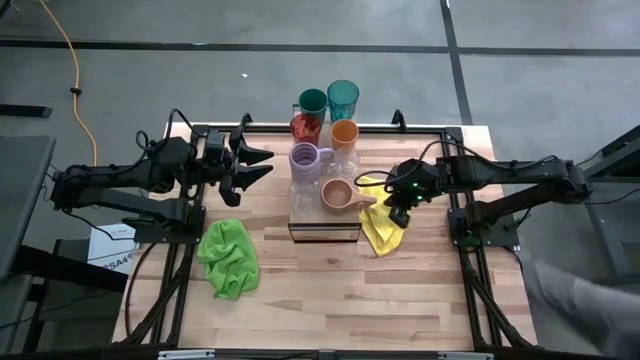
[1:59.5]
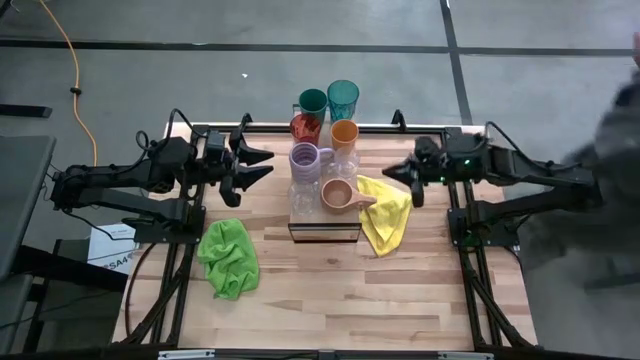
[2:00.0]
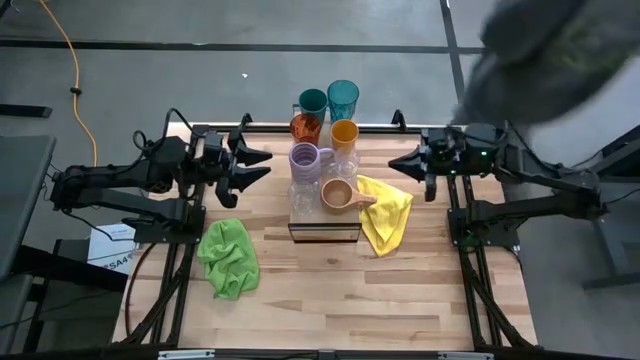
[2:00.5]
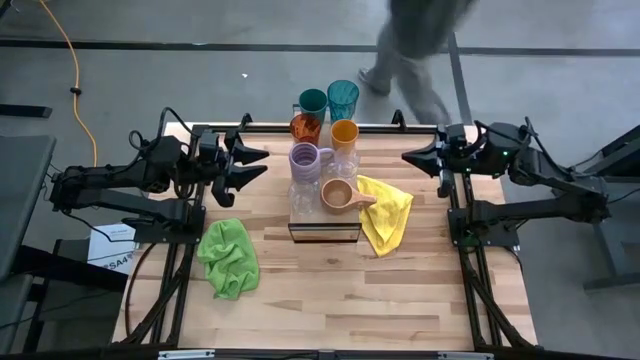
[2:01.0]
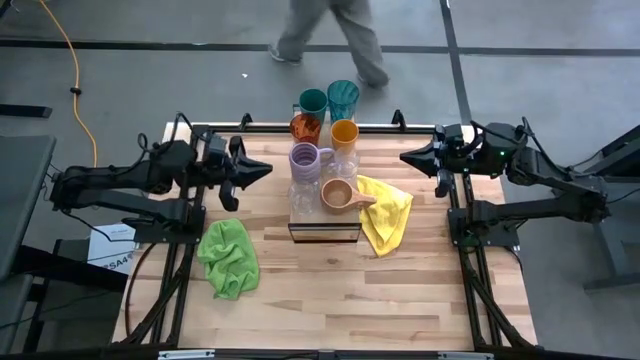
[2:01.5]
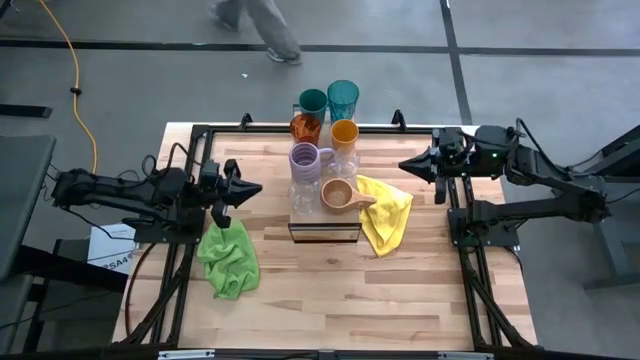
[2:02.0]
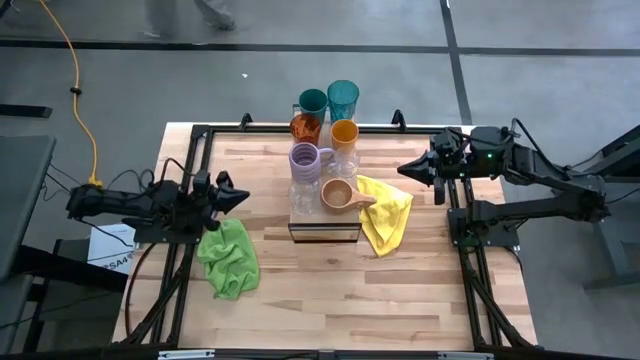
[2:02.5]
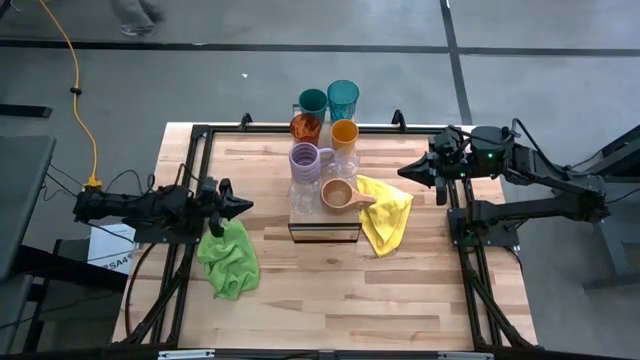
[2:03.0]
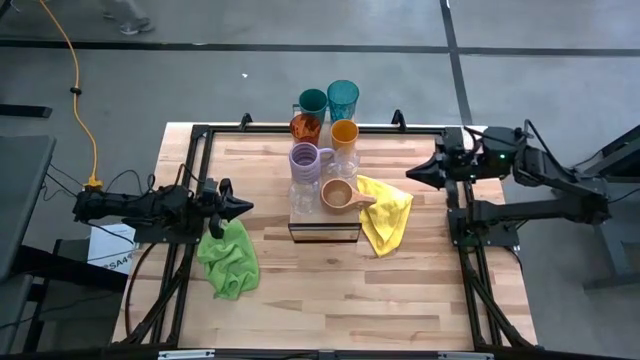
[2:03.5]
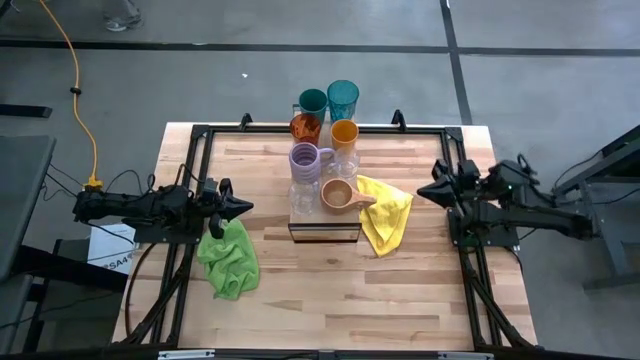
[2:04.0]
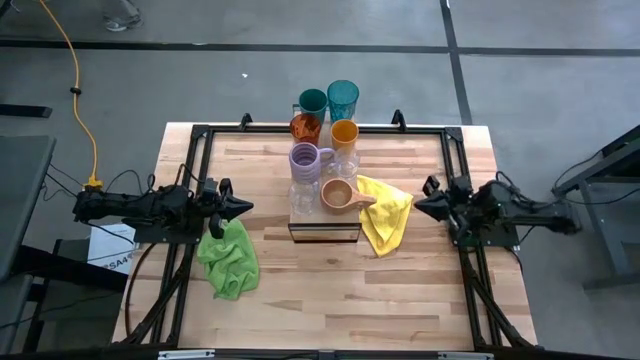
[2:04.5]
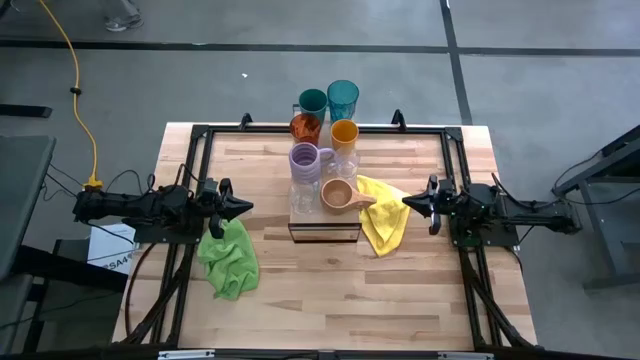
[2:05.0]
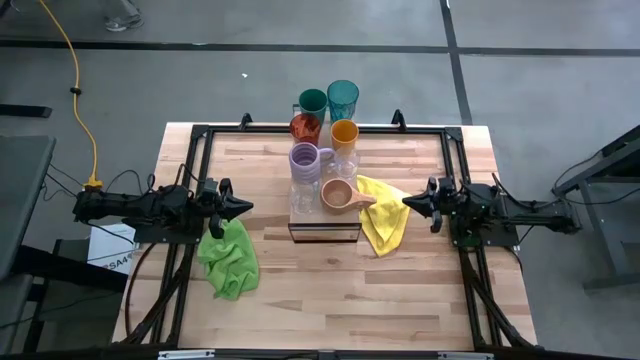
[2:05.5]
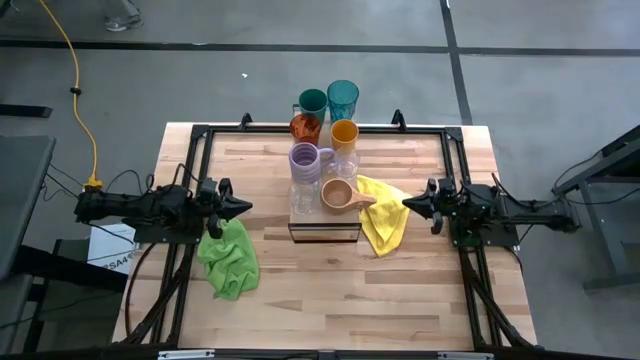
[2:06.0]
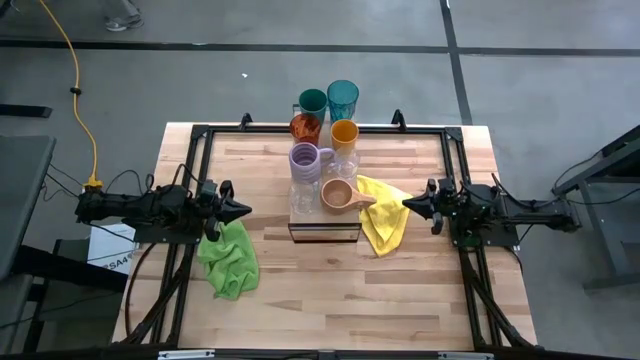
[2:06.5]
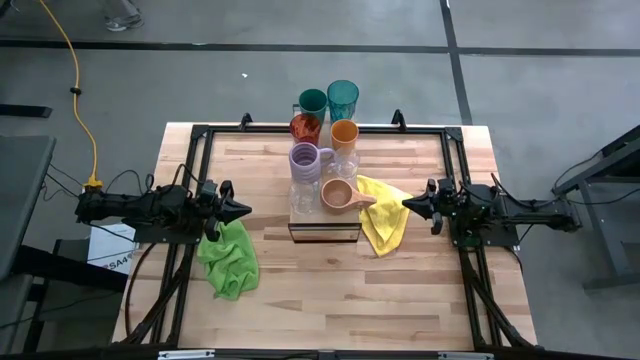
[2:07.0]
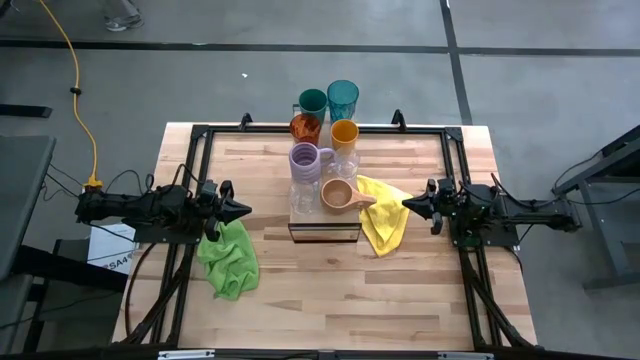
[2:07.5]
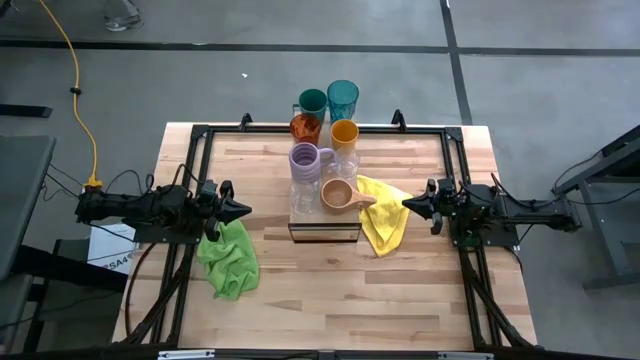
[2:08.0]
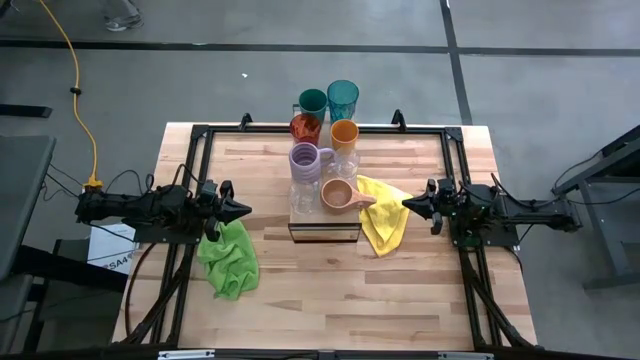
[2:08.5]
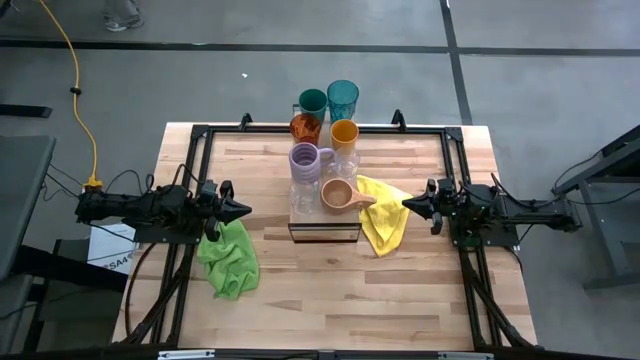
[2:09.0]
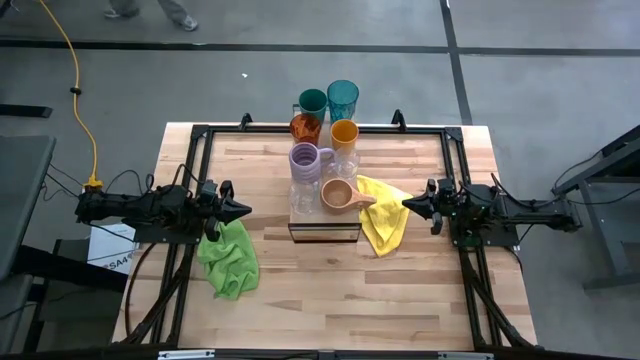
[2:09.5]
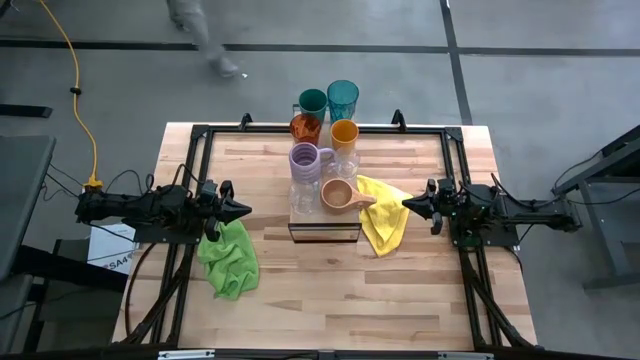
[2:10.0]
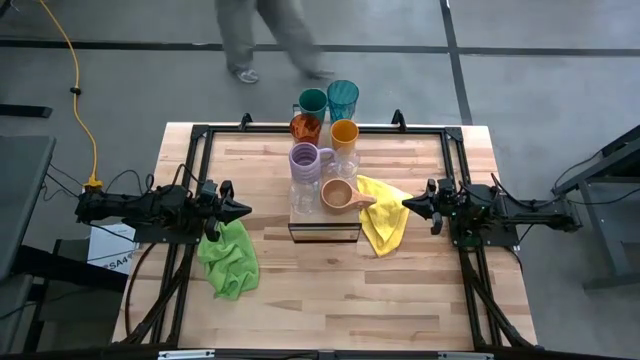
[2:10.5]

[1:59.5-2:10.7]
Task: Stack small to large cups/mugs on shelf
Return to Home Position

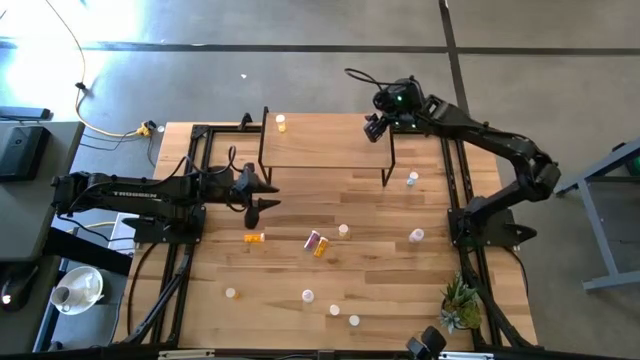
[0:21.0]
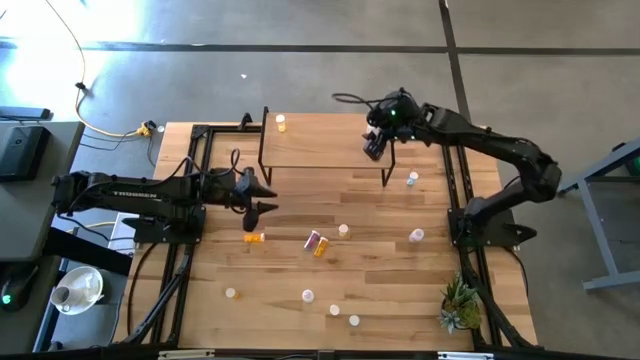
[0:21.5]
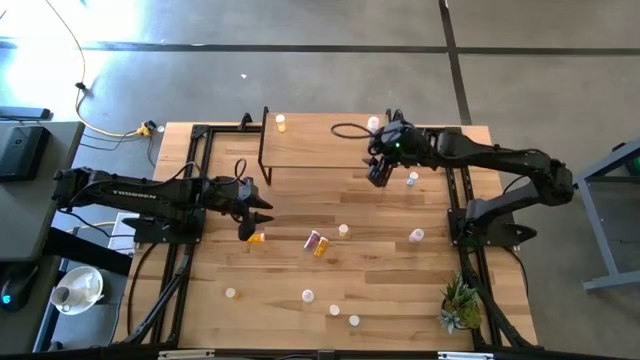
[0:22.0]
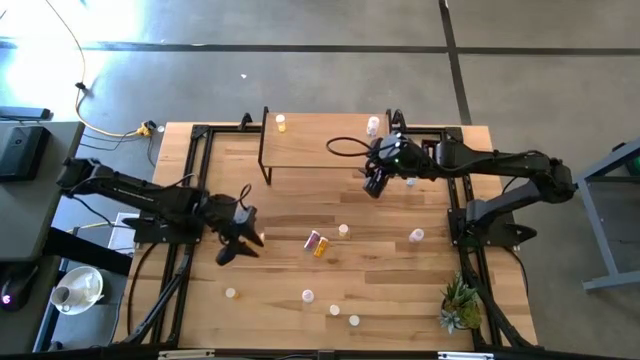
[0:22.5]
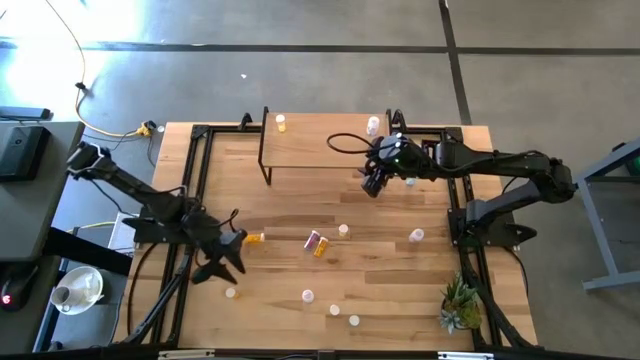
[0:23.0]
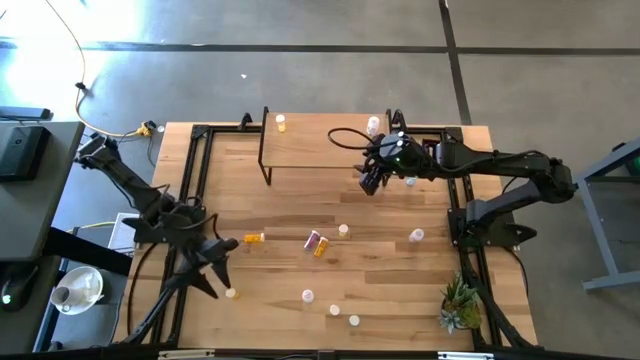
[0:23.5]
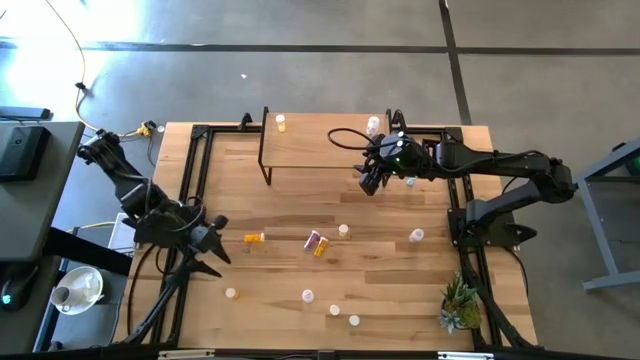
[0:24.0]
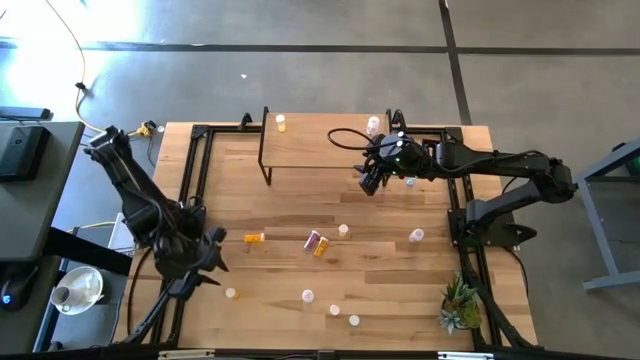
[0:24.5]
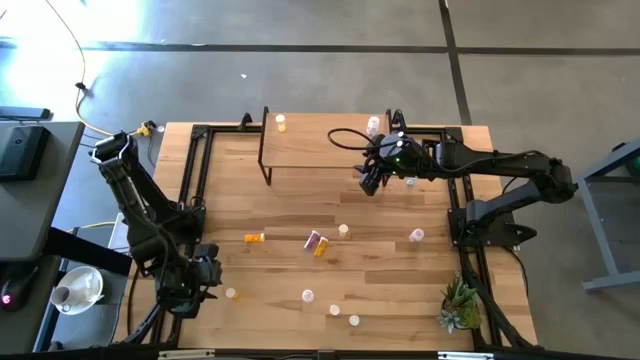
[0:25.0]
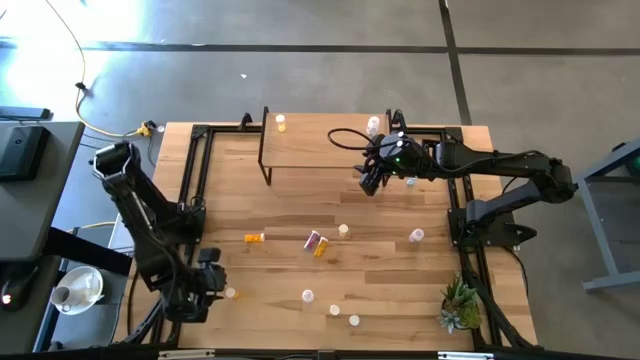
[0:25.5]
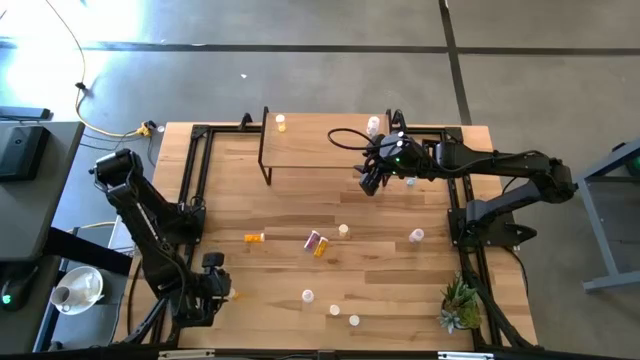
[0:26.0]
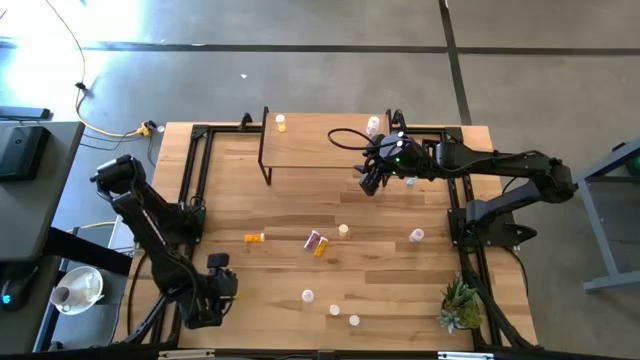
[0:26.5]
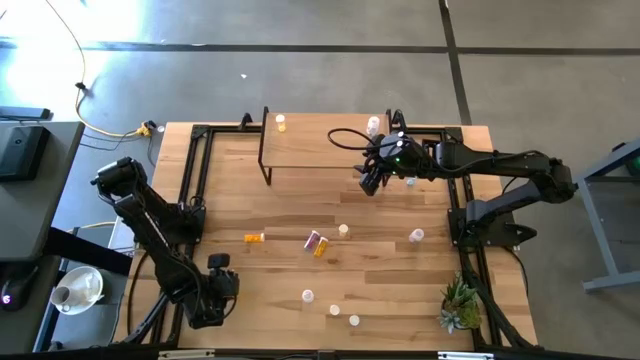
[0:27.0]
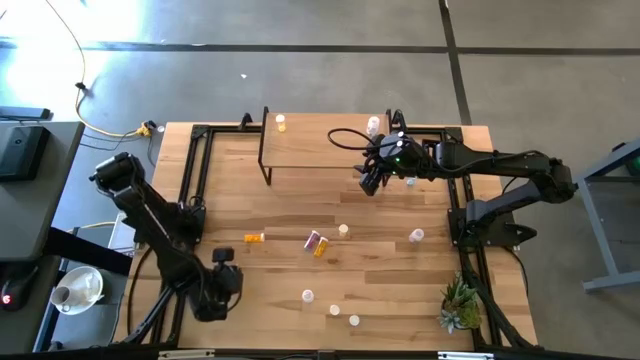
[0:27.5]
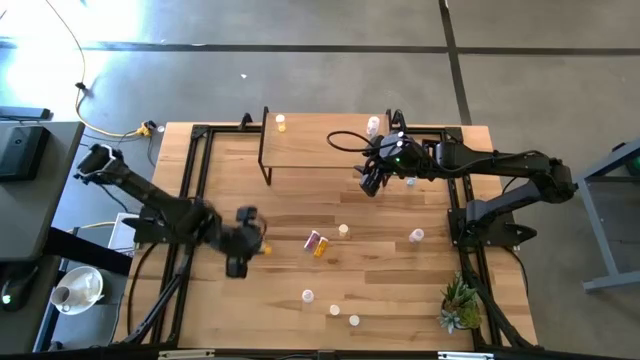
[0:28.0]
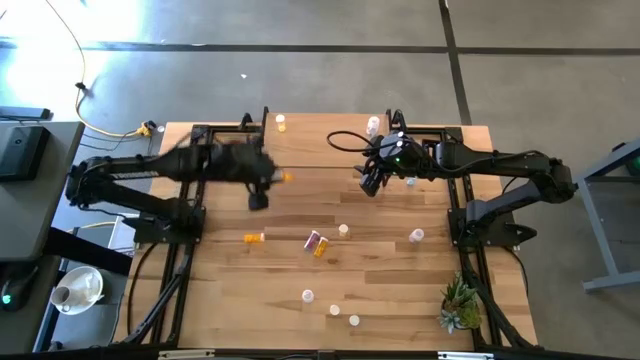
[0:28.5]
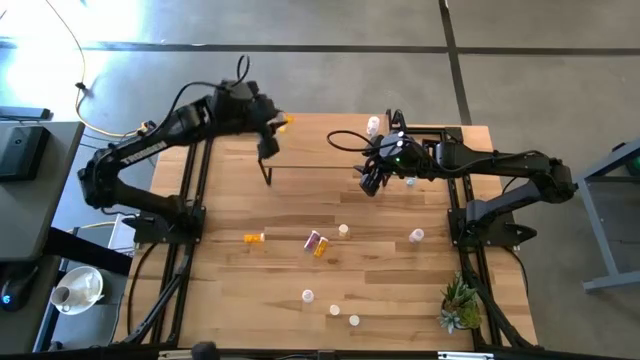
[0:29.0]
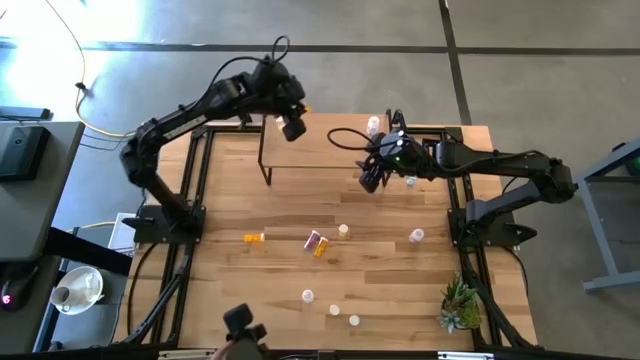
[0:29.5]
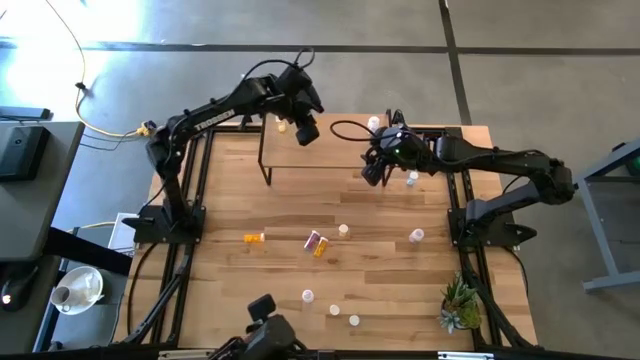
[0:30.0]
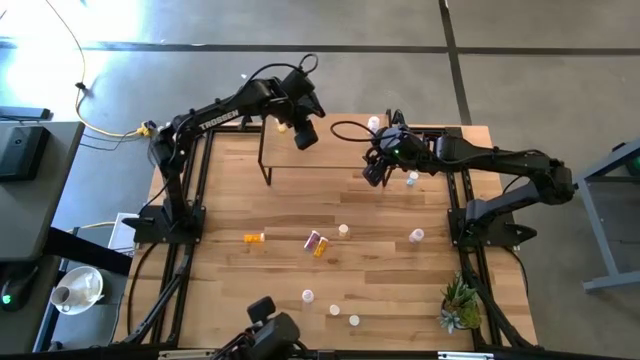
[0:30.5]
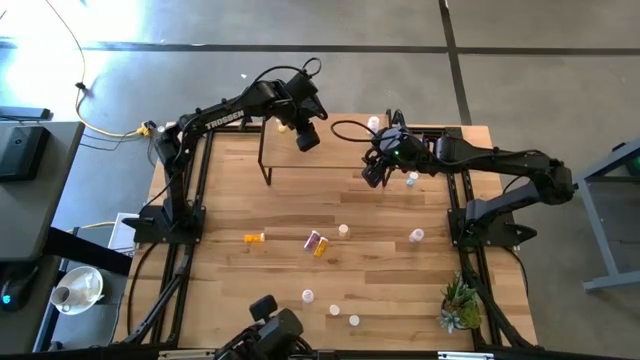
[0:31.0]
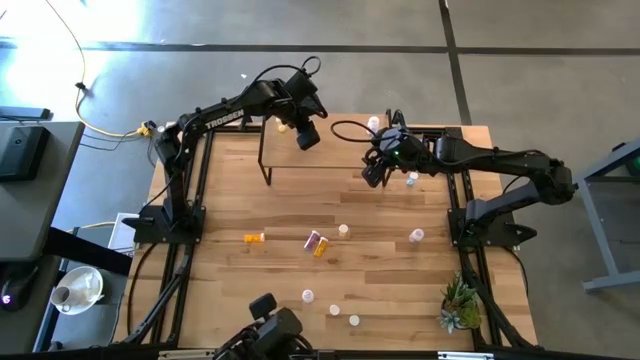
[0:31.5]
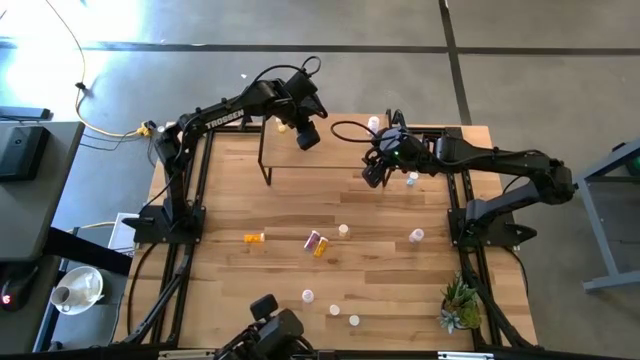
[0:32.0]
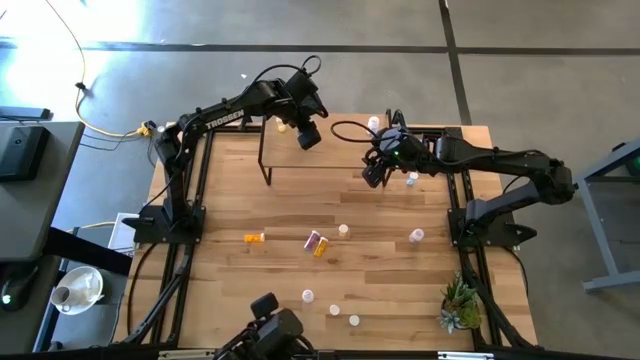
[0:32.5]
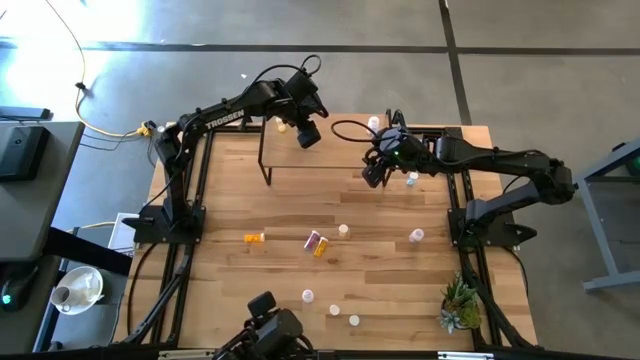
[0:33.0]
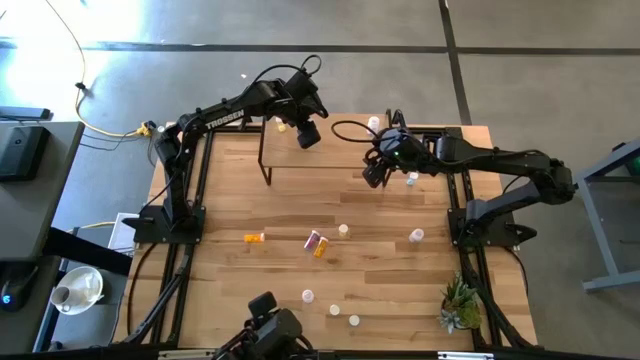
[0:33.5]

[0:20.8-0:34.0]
Task: Pick and place medicine bottles onto shelf by color
Put the bottom orange pill bottle on the shelf
